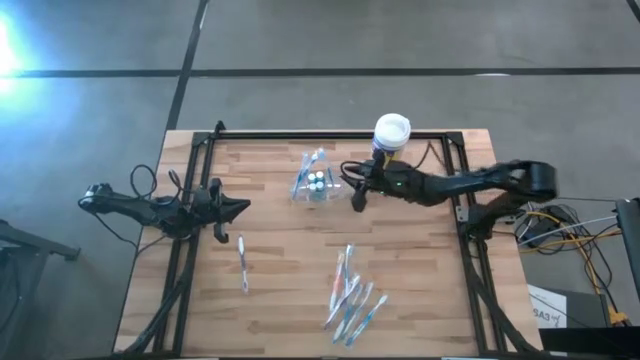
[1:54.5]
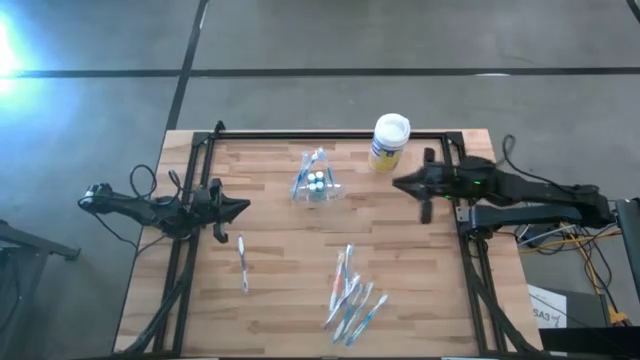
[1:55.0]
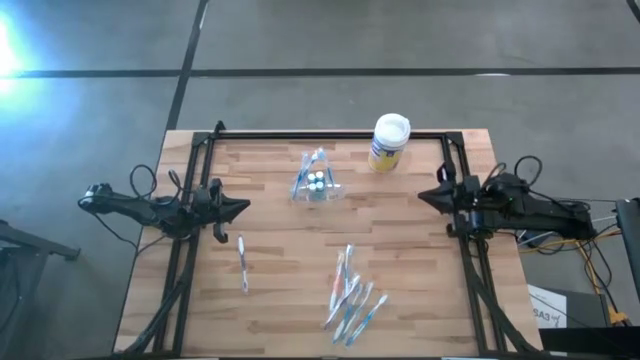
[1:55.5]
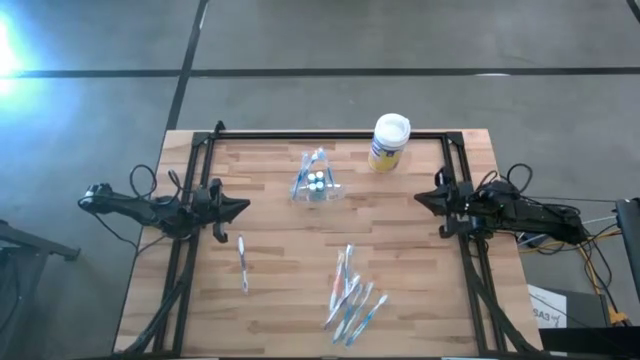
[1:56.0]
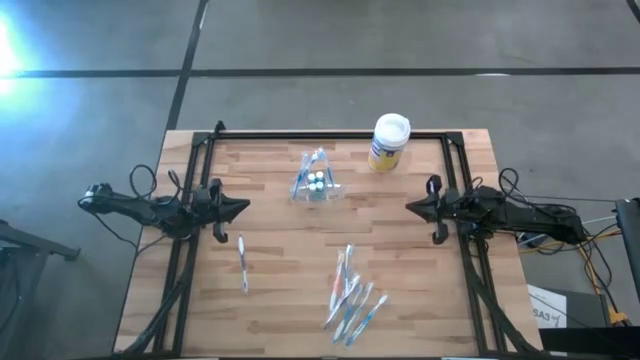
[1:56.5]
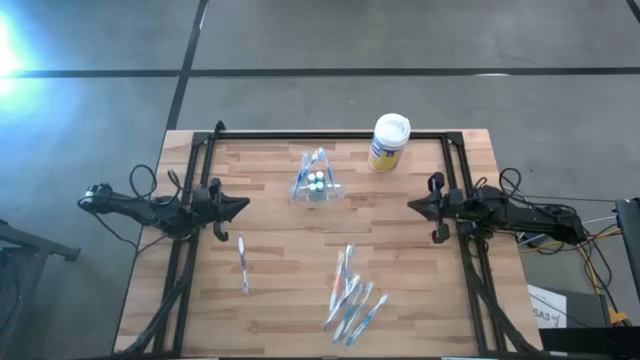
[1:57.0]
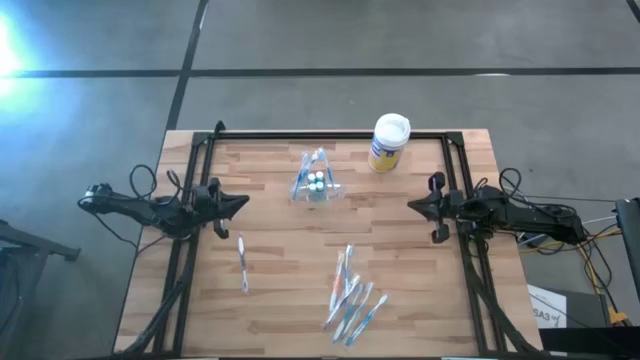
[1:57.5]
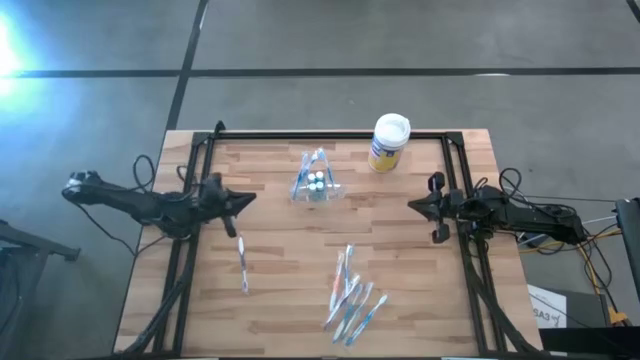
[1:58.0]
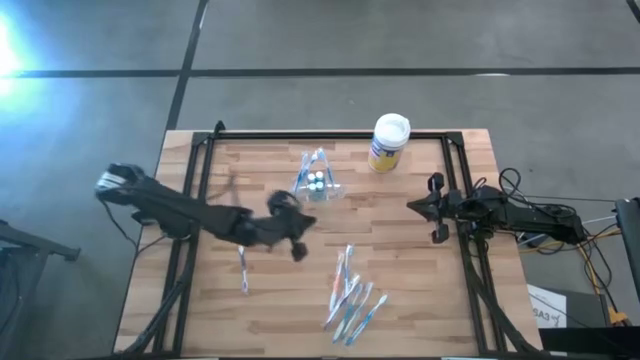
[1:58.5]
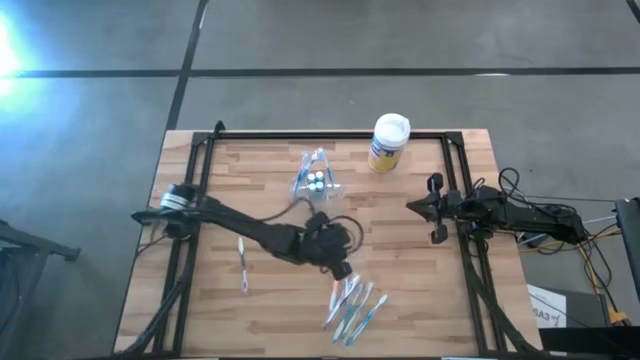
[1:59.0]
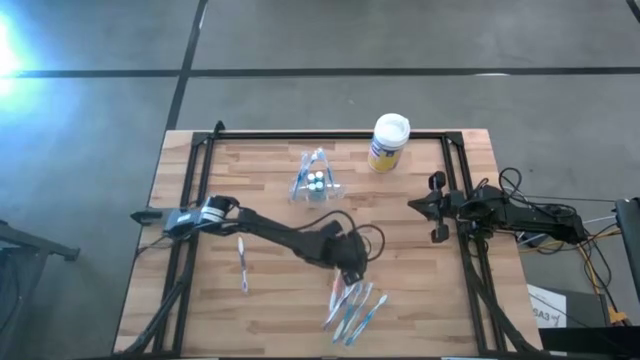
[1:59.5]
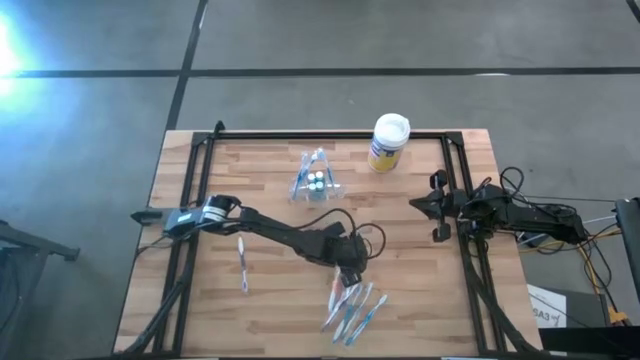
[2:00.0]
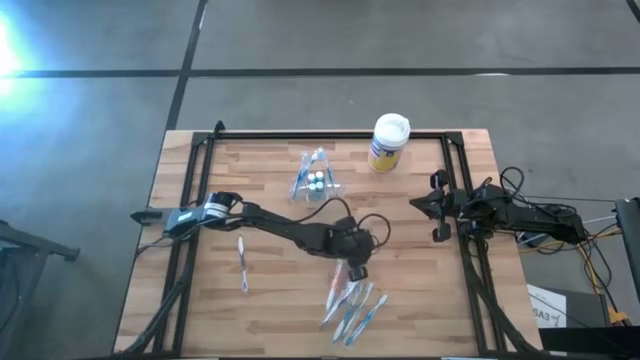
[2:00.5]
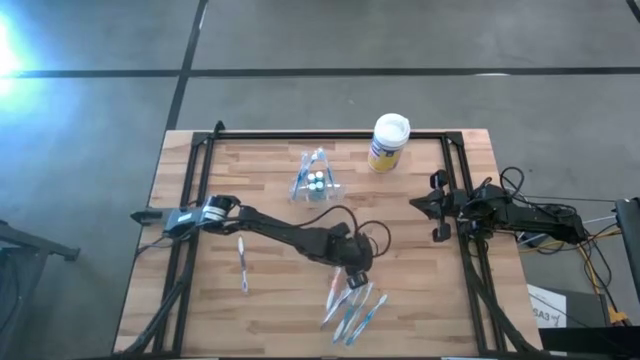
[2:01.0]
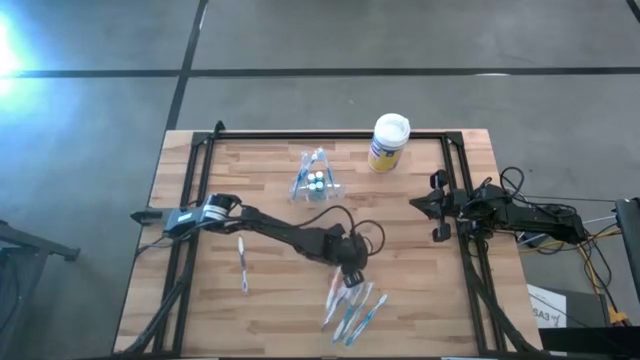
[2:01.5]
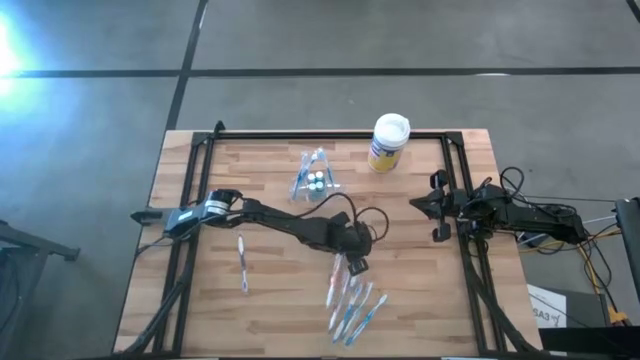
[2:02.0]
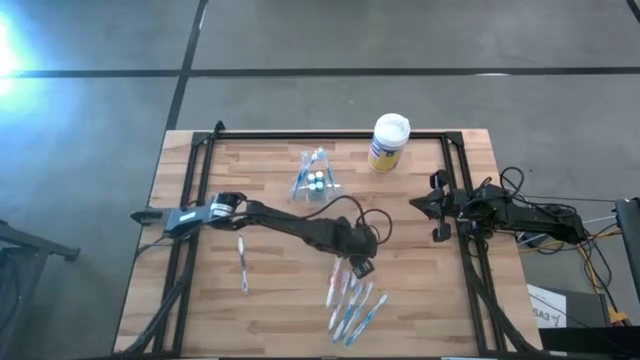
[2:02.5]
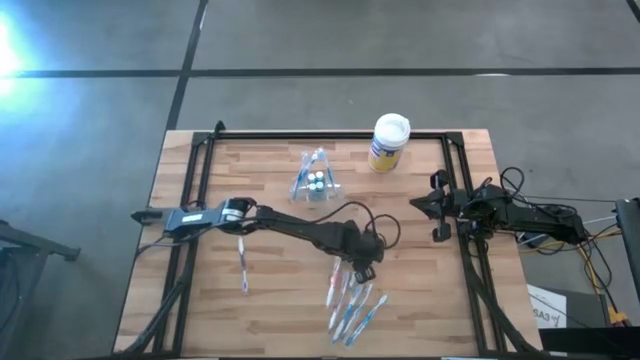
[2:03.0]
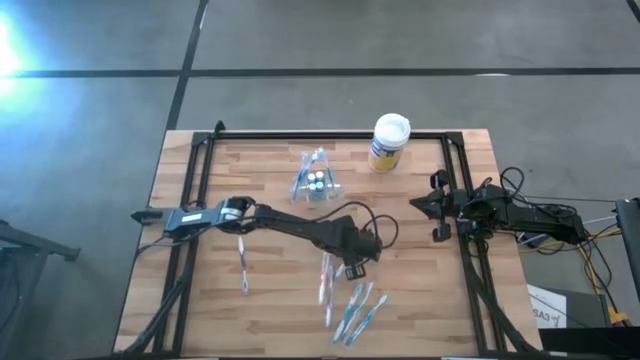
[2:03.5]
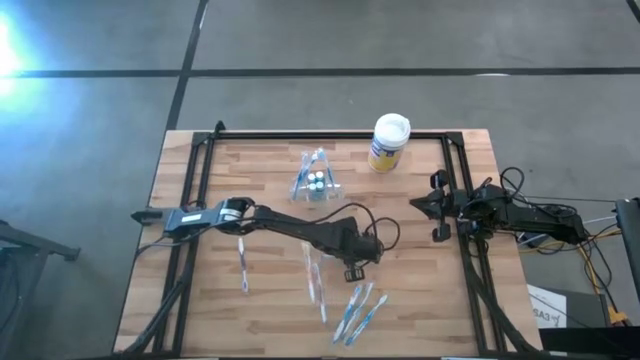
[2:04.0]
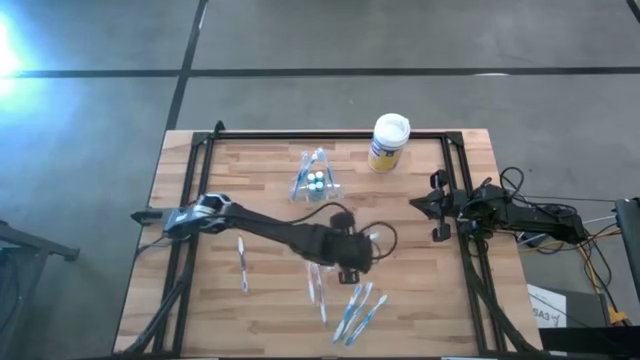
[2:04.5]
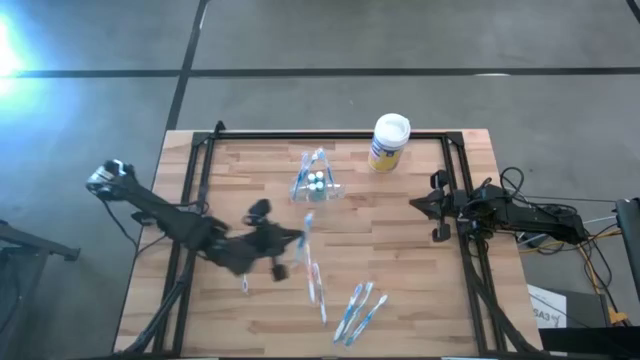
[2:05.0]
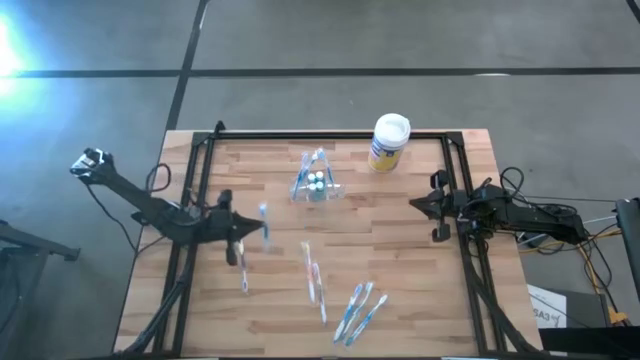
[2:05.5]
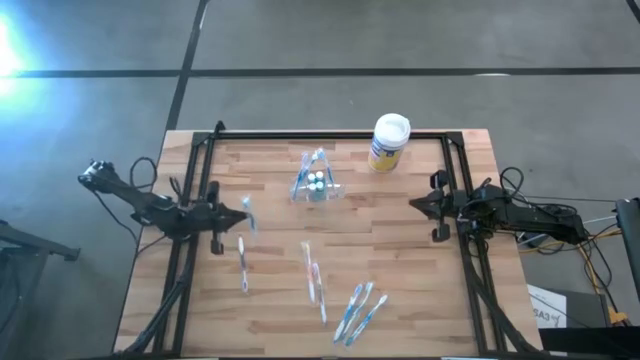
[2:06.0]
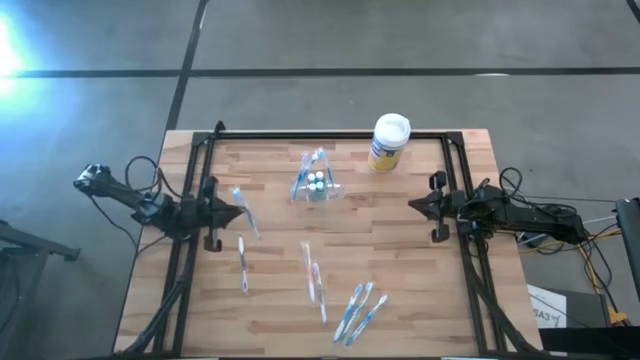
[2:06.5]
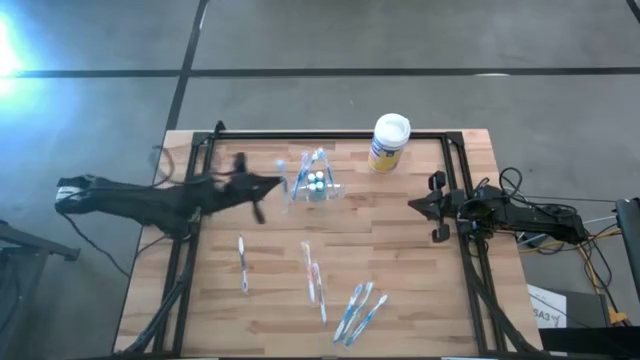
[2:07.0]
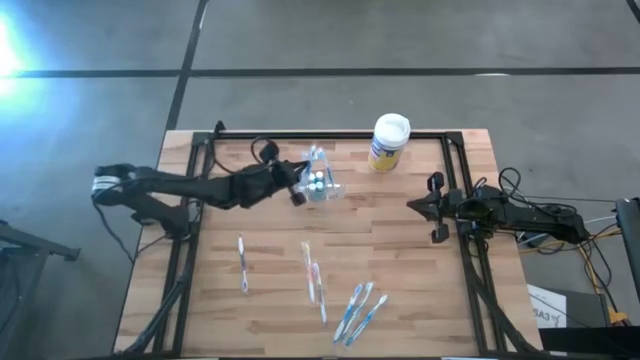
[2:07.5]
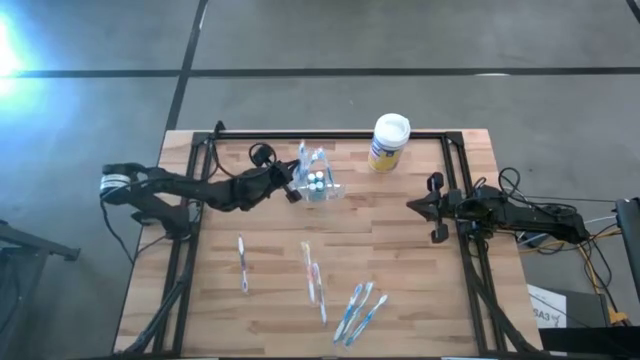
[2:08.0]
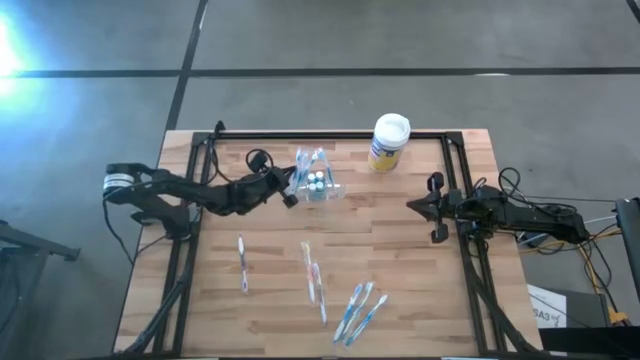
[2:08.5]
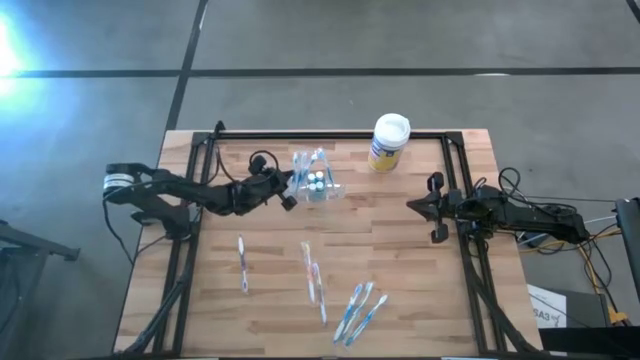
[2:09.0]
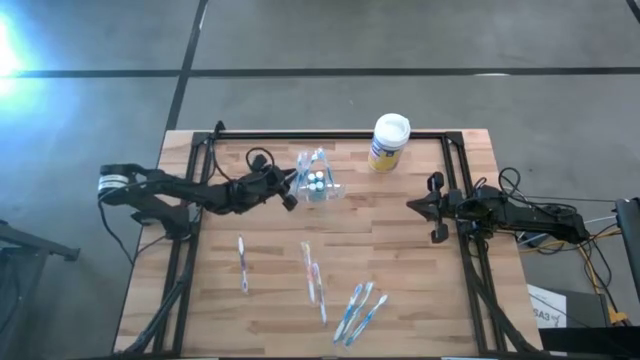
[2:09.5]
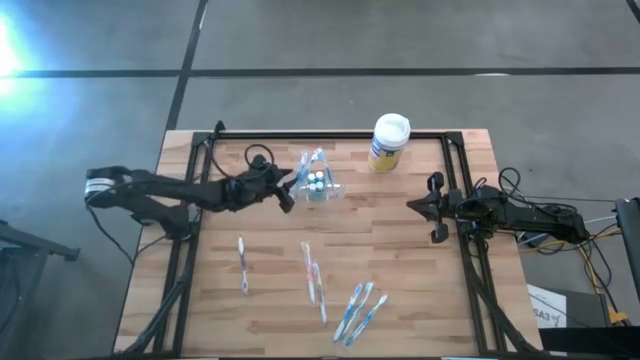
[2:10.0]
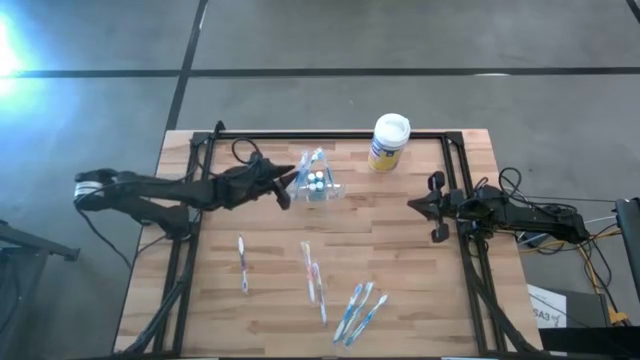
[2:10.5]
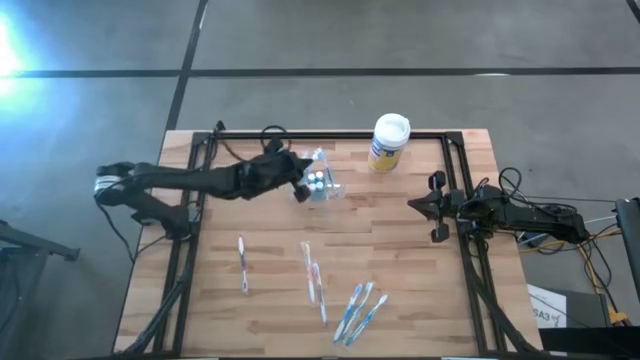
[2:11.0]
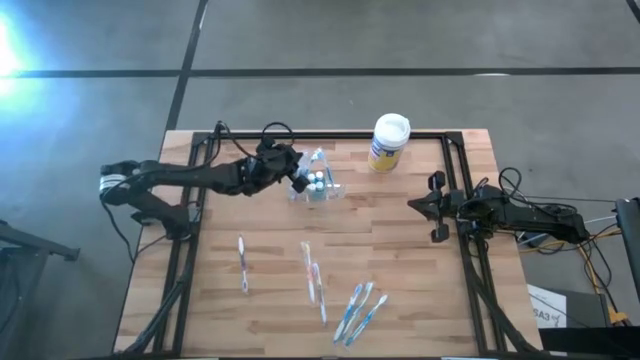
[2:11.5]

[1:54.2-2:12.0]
Task: Pick & Place toothbrushing station
Put the blue toothbrush into the transparent organizer

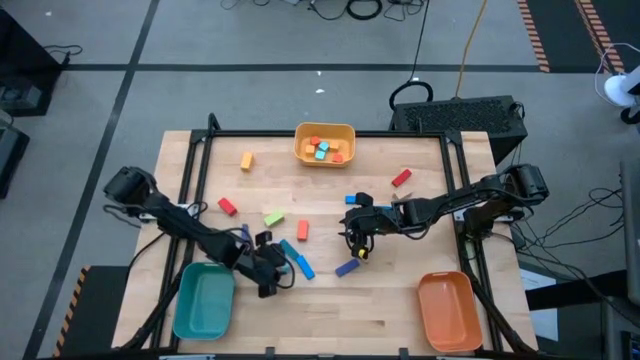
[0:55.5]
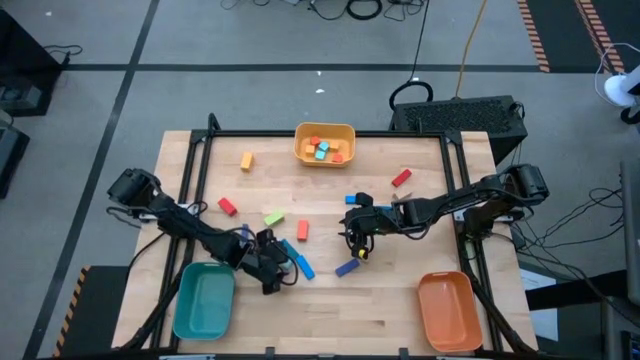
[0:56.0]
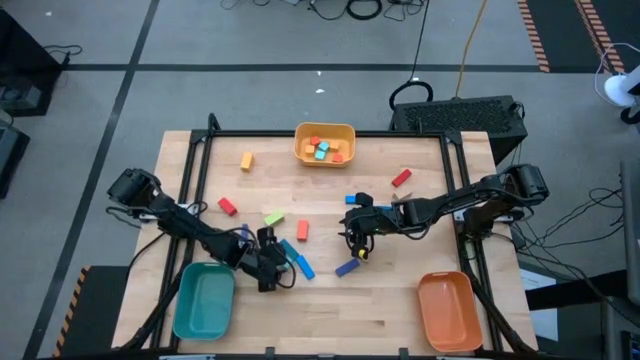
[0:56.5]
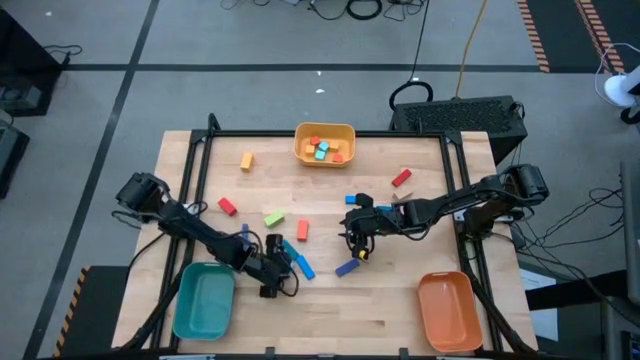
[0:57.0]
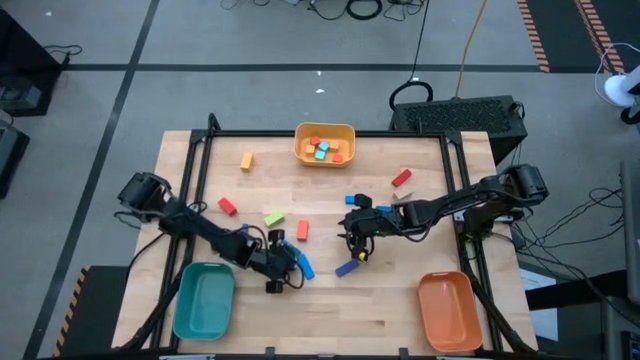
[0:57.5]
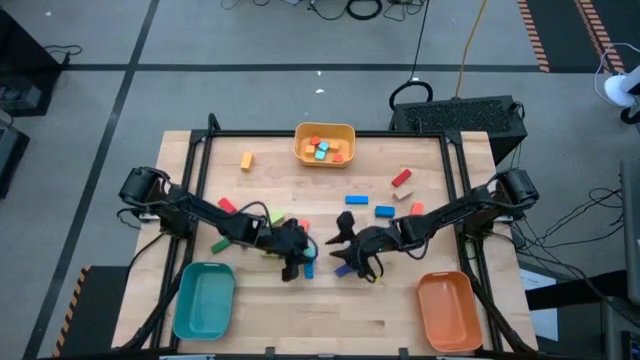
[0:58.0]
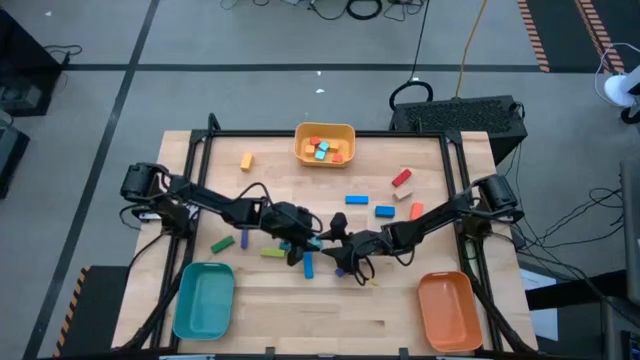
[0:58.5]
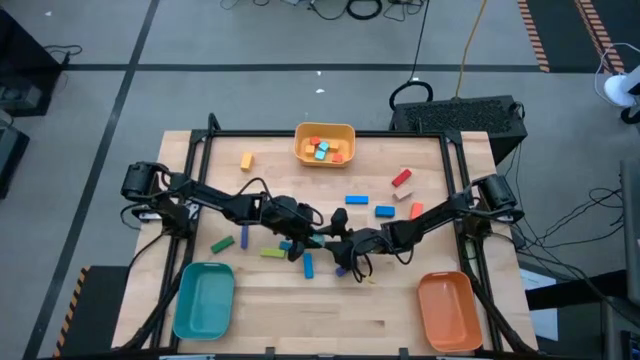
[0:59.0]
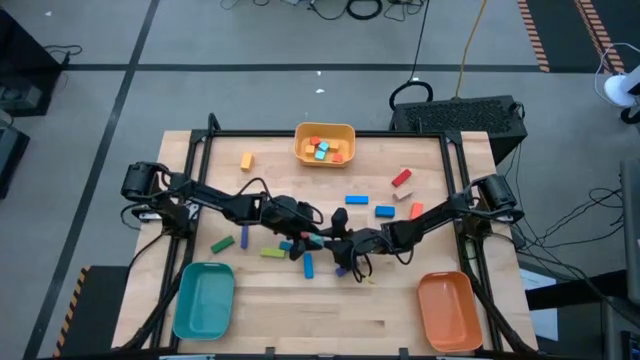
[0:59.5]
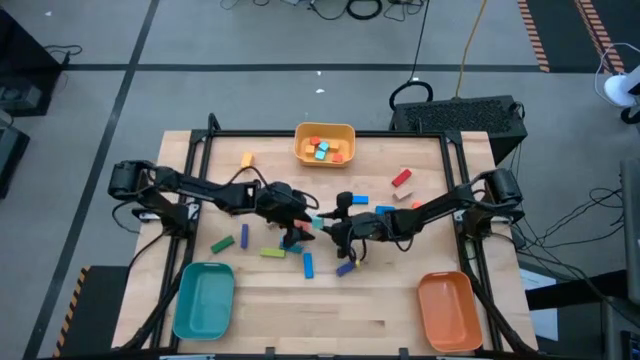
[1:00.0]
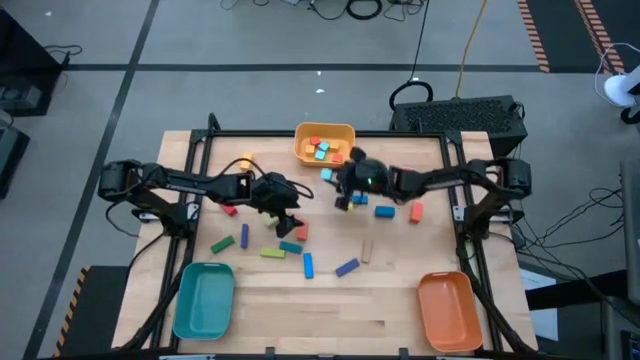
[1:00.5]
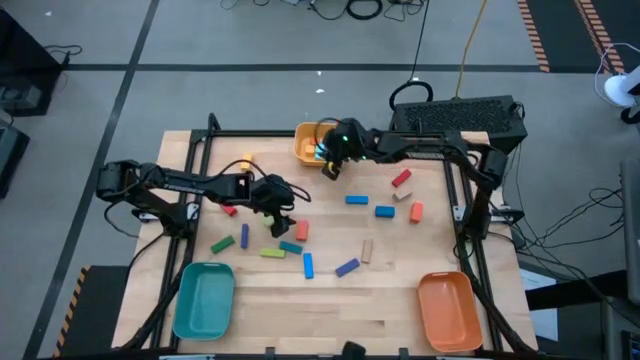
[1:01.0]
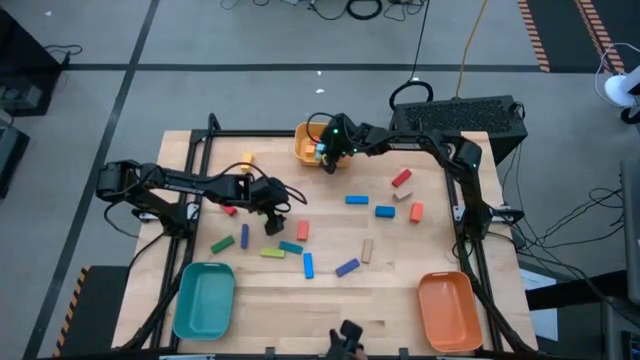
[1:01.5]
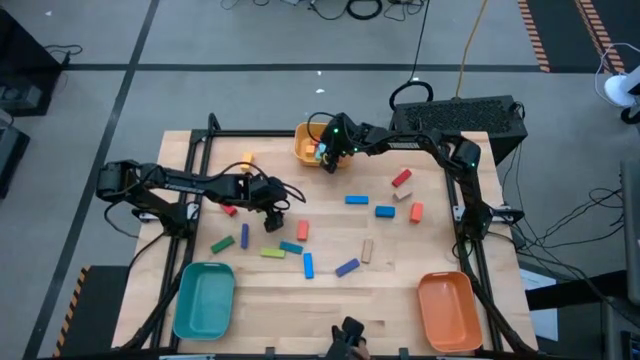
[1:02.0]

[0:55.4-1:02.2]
Task: Sort blocks by size
Put the blue square block into the yellow bin
